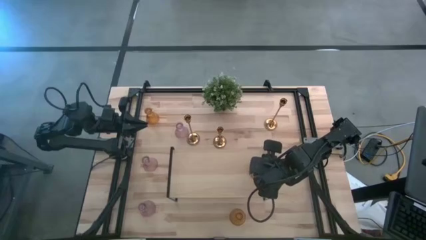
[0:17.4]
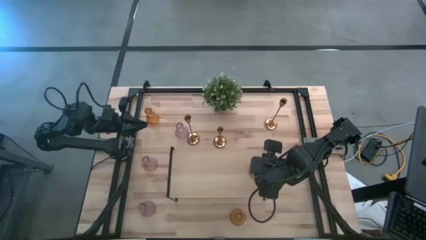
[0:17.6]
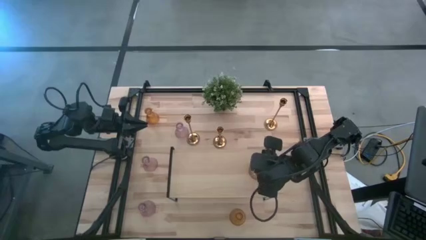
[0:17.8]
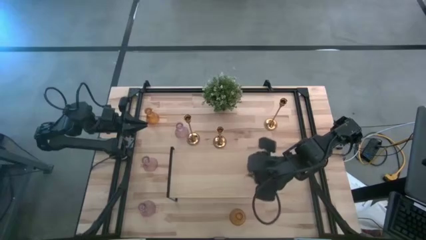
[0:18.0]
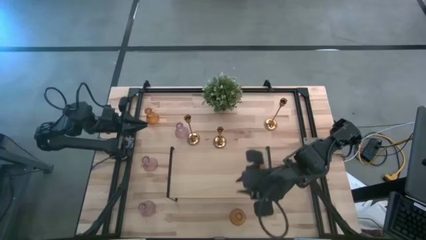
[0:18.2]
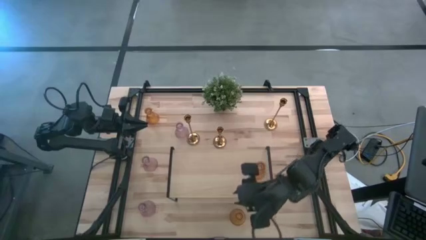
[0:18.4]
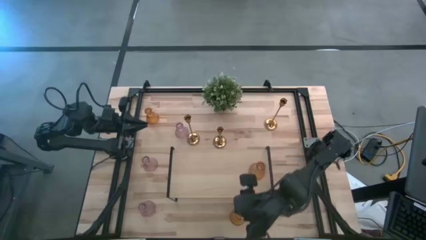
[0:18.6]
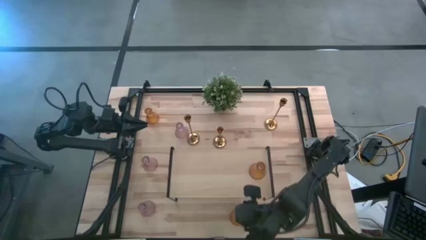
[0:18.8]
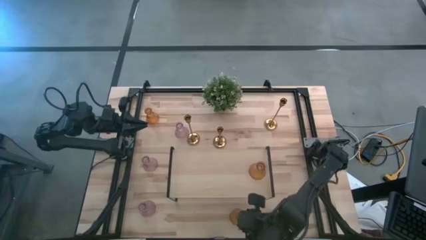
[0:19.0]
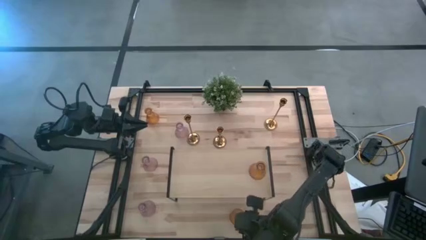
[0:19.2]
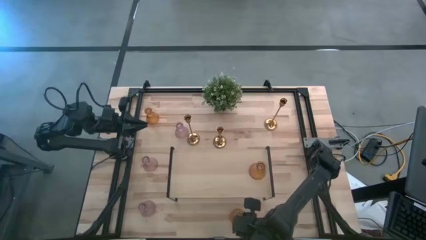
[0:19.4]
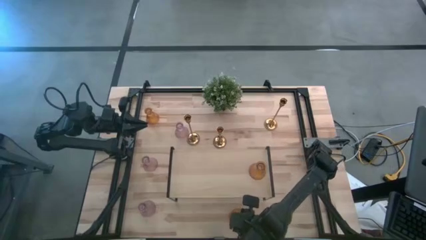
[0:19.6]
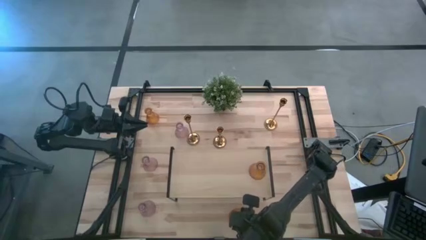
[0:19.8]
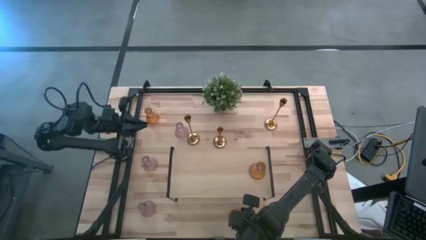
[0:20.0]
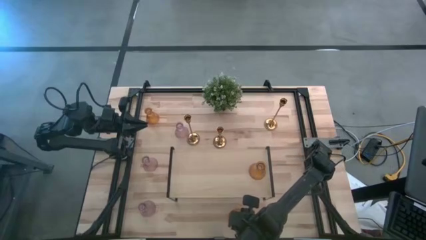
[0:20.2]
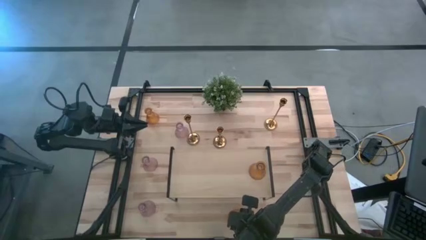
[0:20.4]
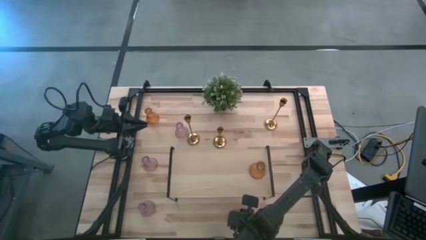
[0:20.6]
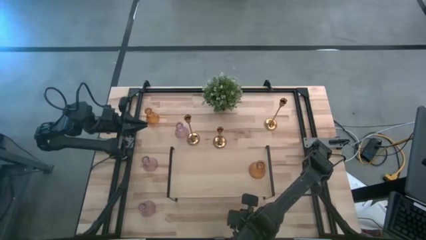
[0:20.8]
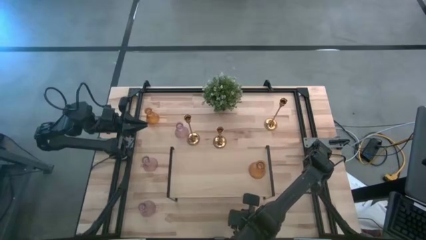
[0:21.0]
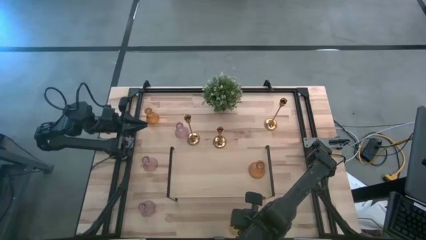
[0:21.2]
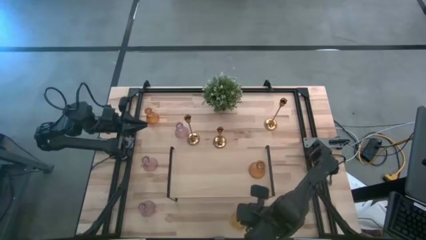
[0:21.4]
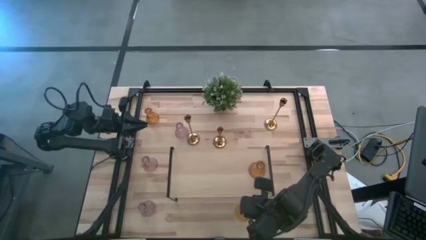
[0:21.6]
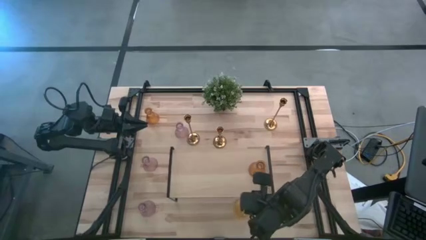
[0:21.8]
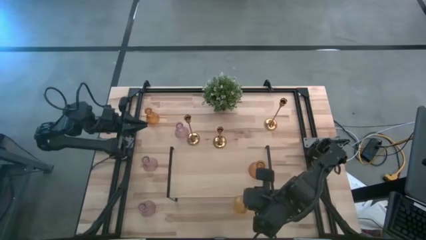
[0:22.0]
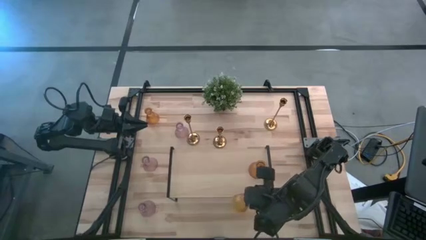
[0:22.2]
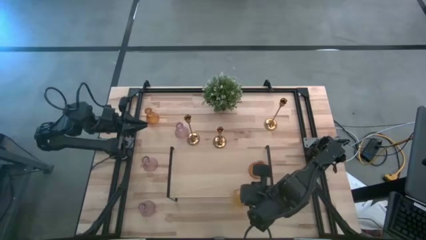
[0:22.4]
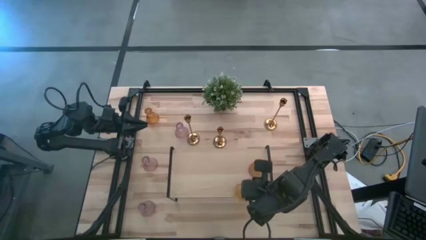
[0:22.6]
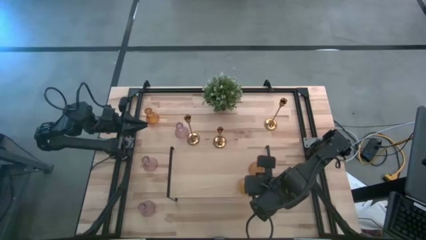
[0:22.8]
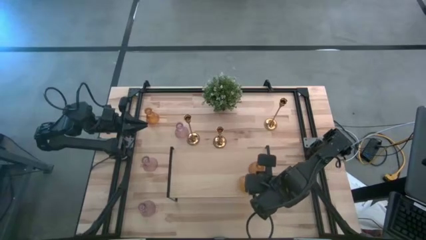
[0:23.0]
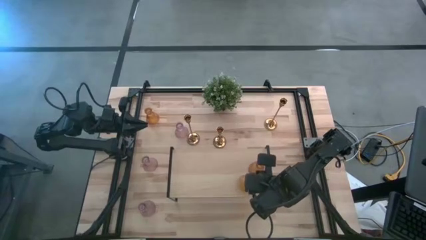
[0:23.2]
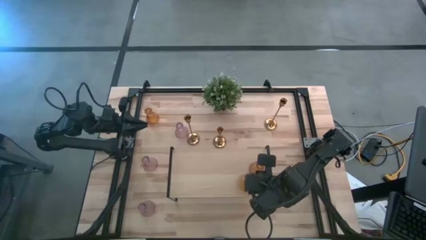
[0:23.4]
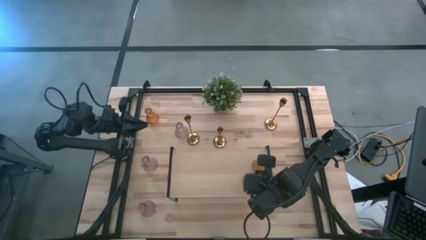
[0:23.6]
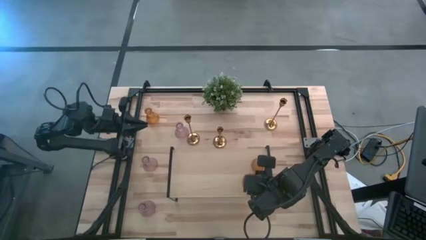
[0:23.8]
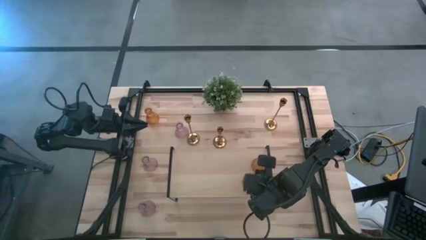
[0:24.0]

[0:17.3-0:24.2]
Task: Pick & Place candle stick holders
Put the bottom yellow candle holder on the shelf
